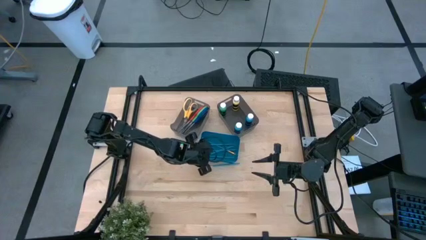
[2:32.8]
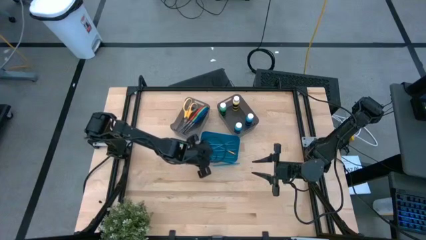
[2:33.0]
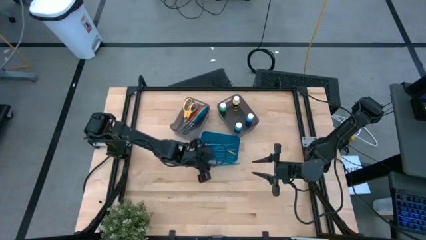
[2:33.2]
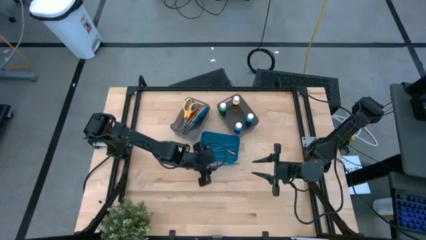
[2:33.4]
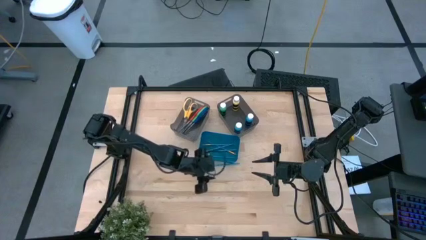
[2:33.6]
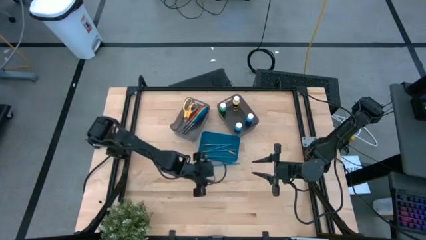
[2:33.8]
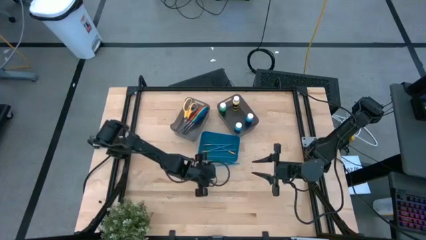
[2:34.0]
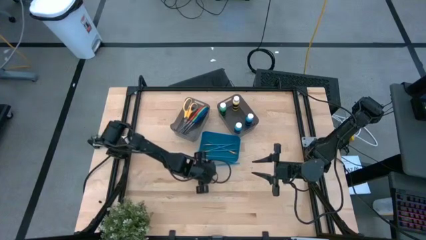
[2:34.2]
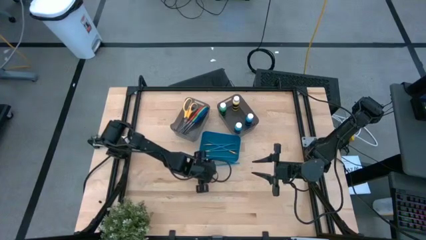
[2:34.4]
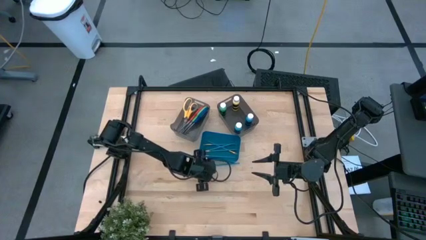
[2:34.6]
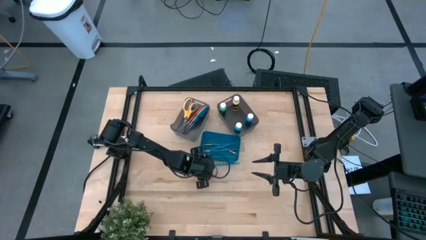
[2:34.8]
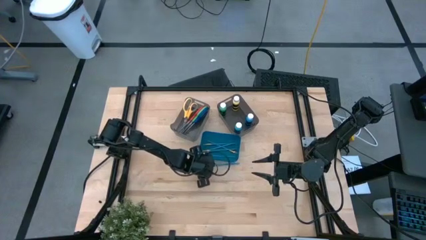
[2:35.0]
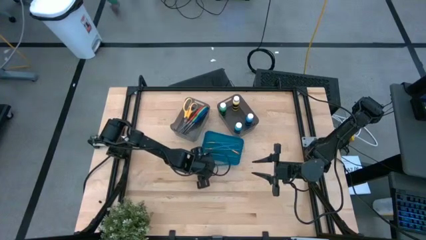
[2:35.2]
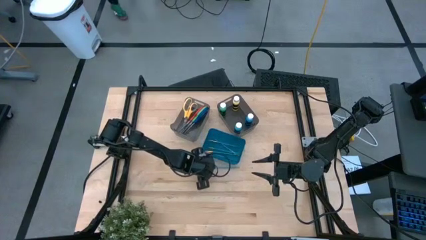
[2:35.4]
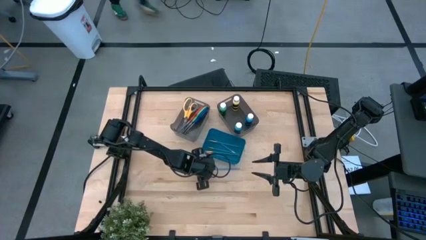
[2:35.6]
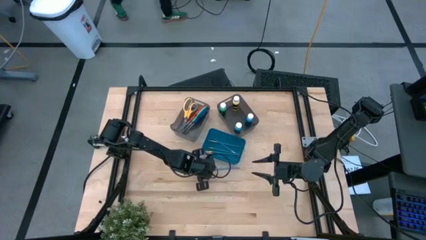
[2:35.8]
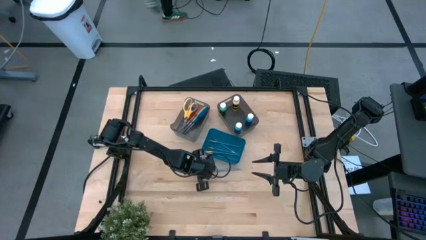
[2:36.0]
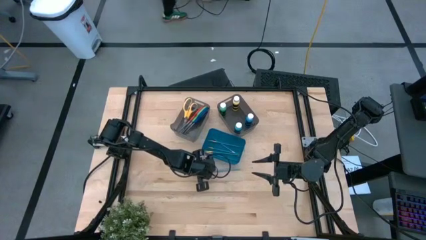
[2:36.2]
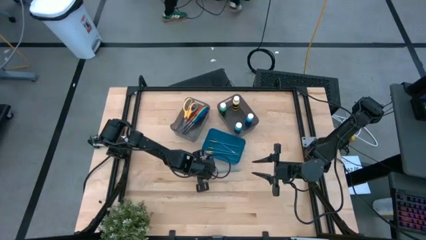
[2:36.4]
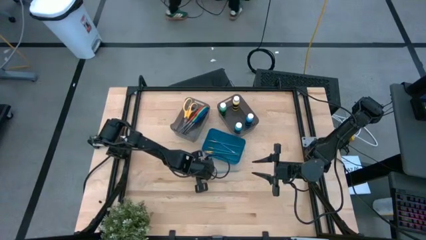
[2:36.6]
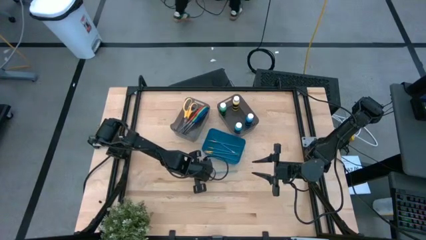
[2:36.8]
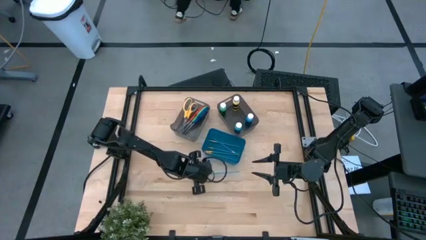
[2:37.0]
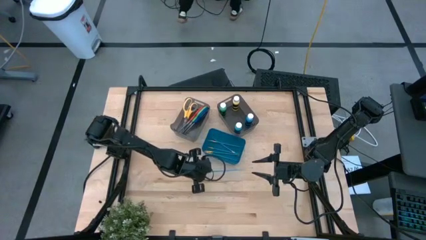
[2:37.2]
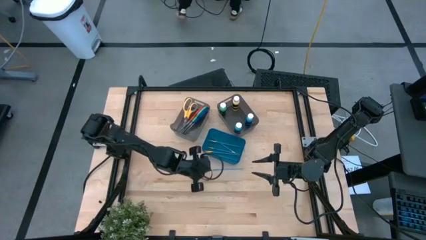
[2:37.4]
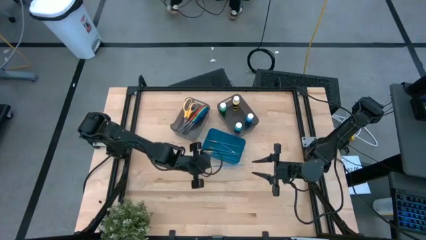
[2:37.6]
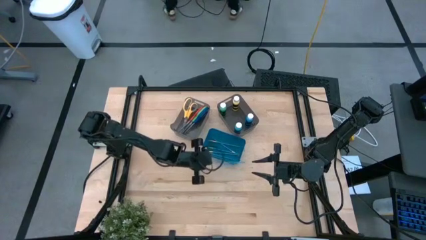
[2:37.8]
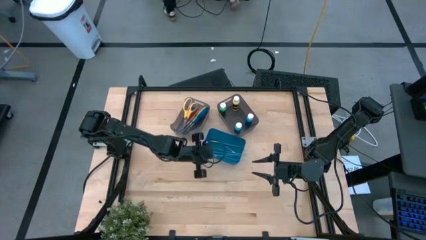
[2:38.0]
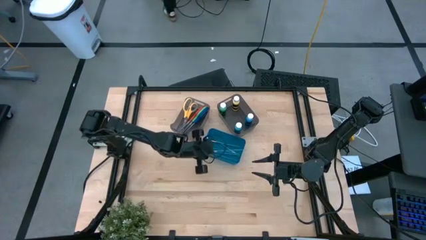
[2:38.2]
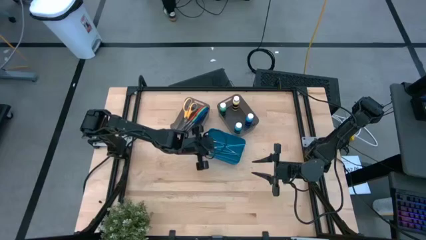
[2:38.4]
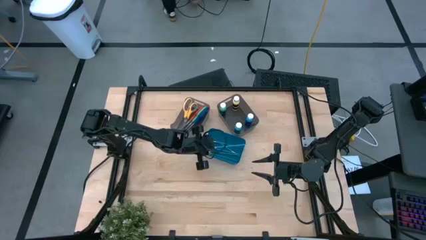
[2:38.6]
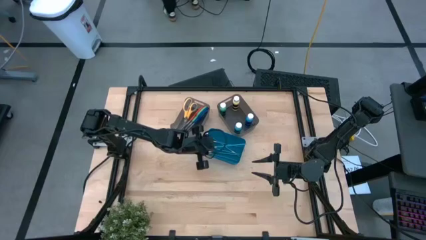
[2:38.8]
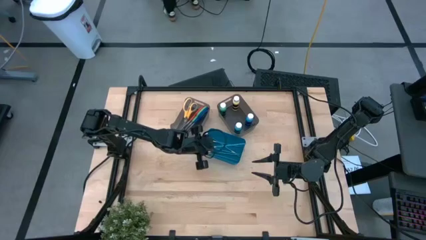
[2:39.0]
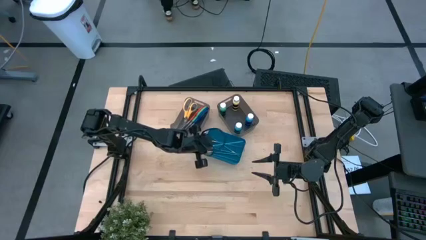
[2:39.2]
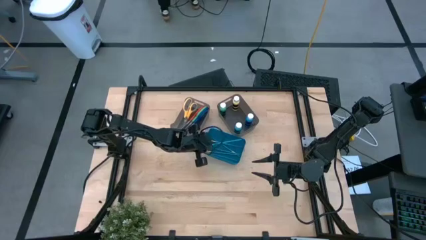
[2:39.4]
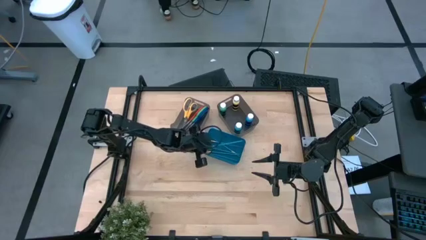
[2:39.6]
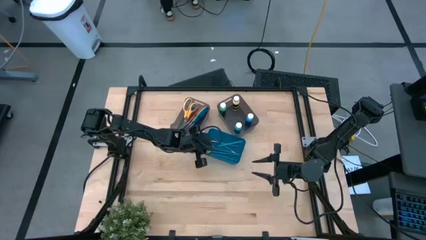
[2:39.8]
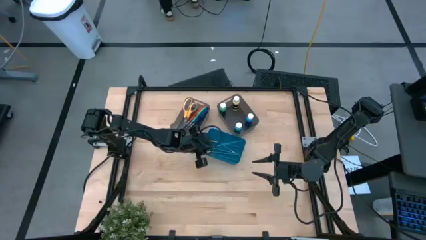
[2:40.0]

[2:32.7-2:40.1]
Task: Pick & Place Paint Supplies
Put the blue paint brush into the blue bin

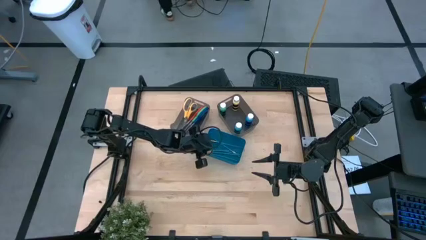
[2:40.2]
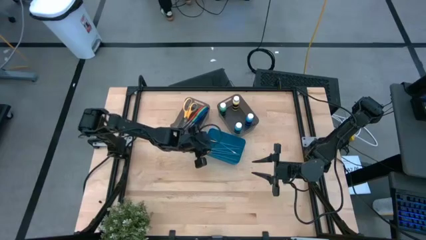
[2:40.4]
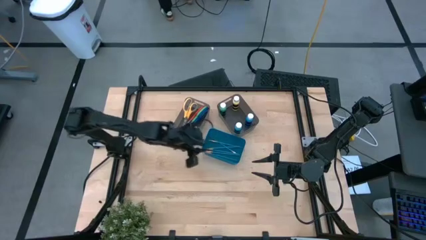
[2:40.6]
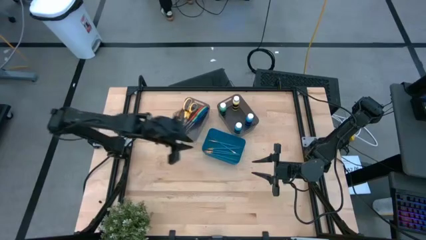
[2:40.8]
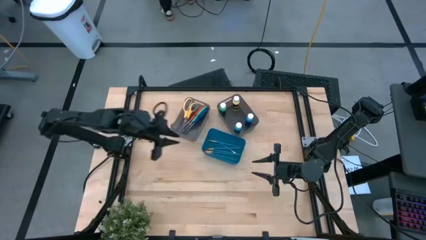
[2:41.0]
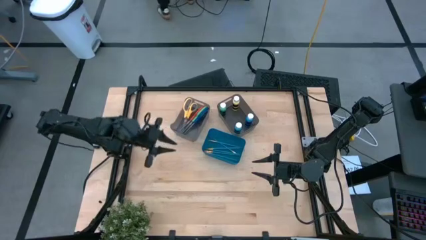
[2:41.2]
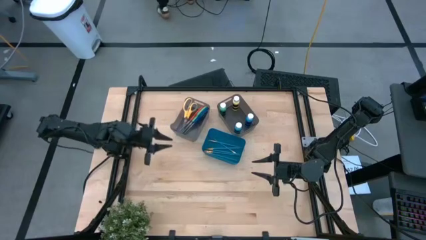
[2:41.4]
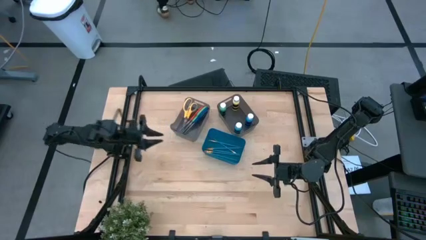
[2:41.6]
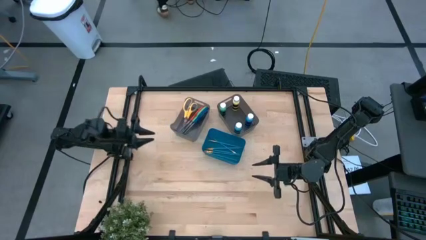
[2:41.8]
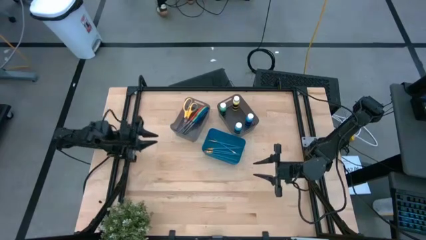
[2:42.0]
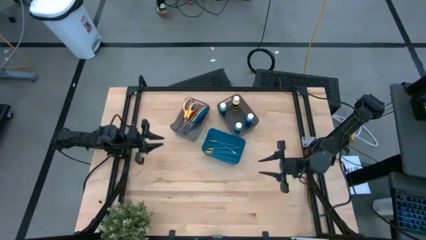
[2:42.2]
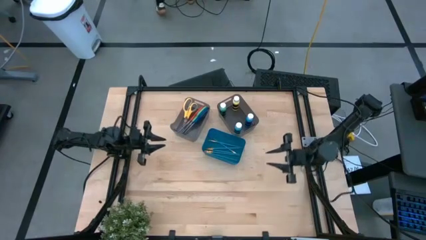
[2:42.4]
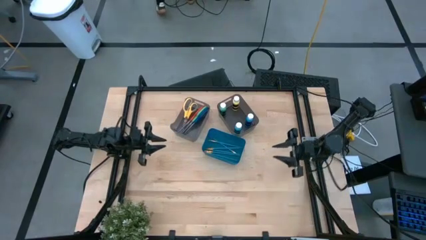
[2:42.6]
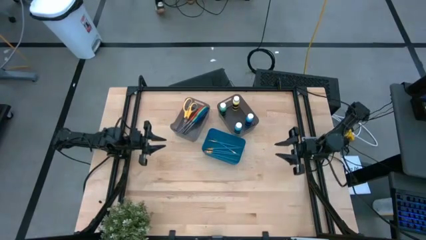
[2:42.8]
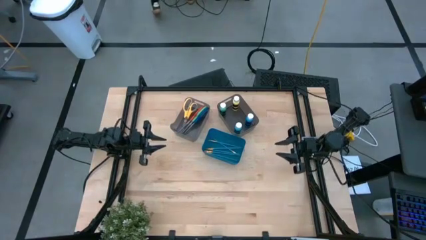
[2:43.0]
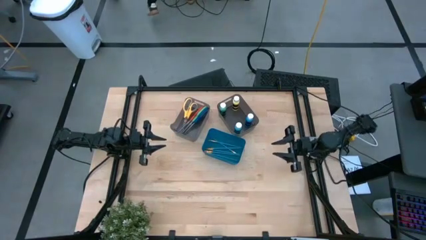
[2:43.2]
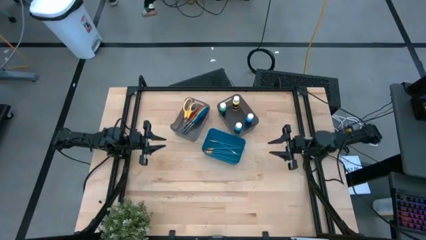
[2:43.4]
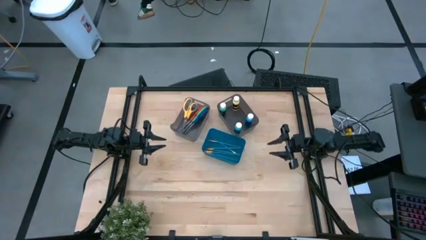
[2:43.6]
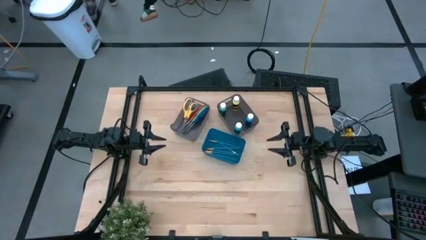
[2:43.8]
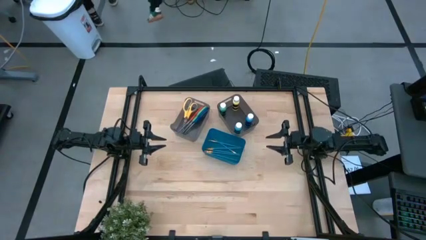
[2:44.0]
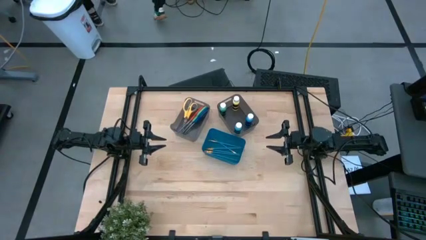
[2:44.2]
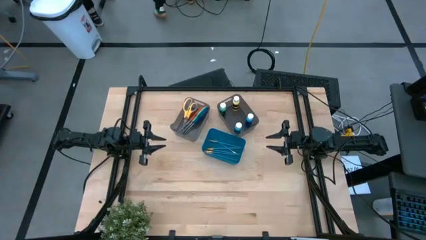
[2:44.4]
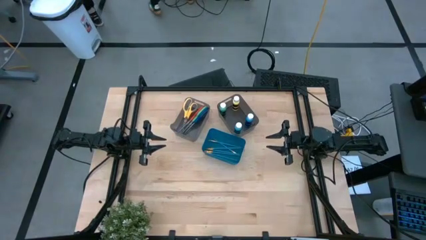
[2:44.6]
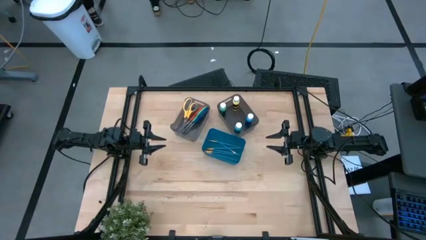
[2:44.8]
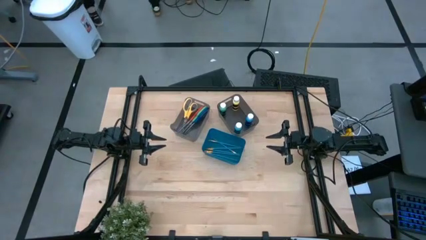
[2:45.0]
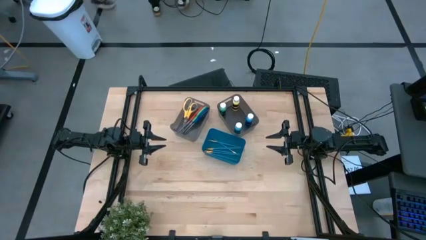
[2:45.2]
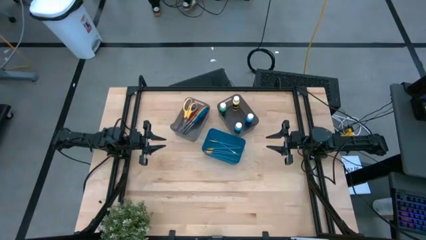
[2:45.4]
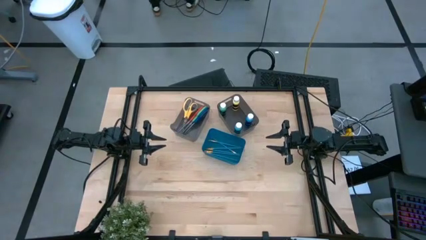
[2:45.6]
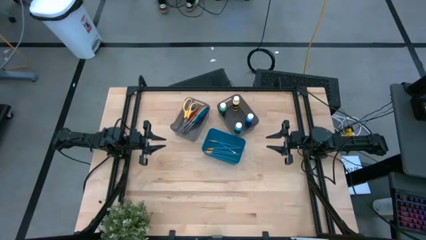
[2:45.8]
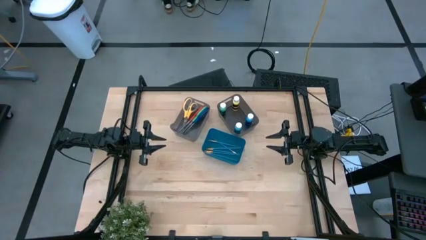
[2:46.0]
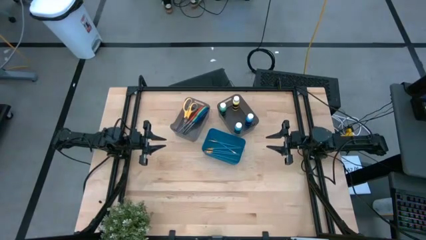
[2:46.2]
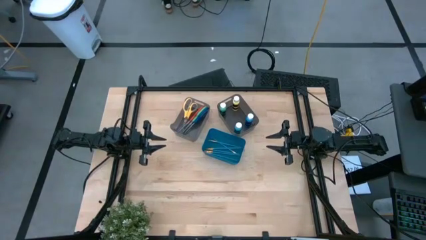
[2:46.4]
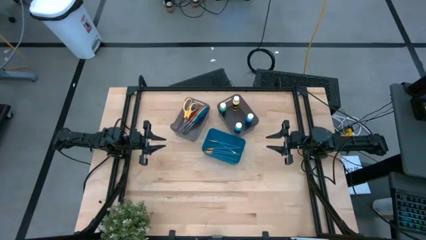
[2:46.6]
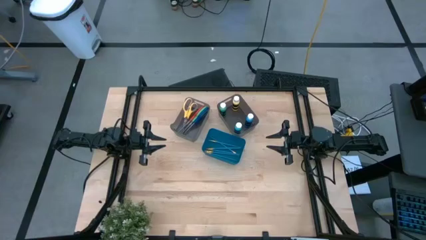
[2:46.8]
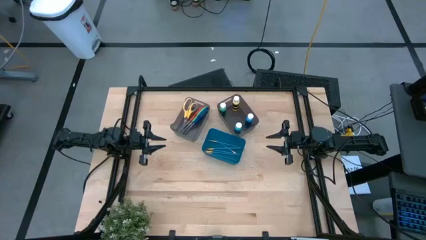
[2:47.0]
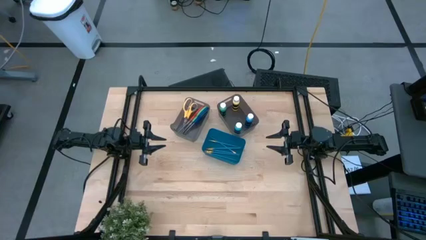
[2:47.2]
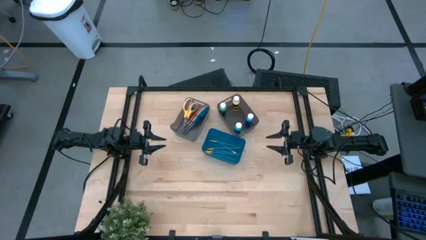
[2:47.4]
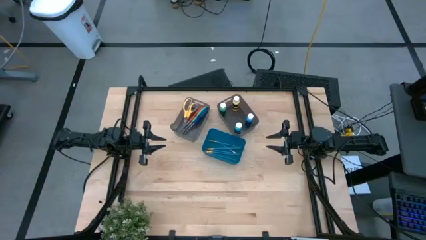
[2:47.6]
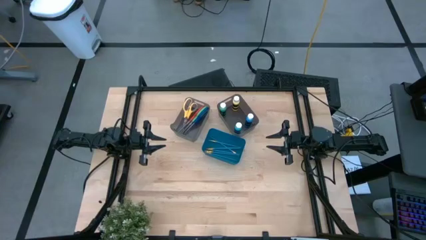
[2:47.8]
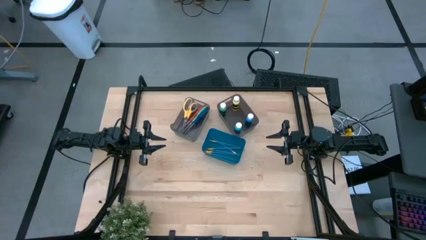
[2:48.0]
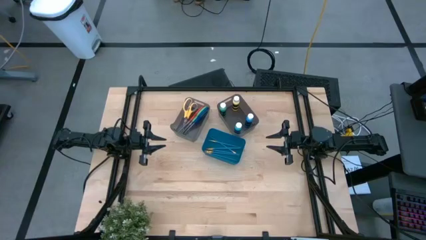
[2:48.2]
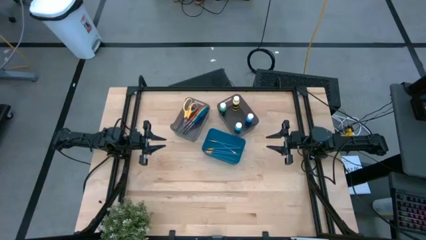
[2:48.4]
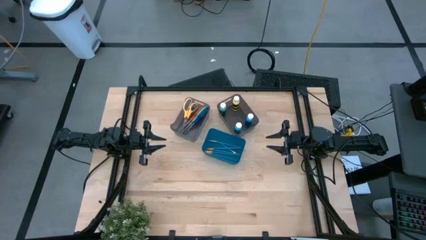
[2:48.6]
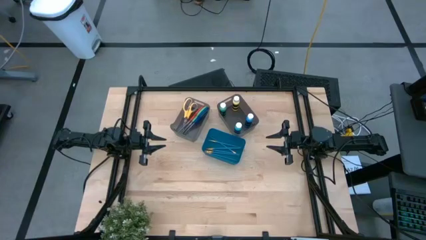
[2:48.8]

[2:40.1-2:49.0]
Return to Home Position
